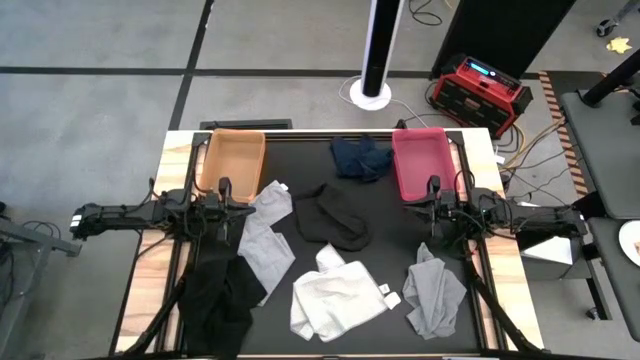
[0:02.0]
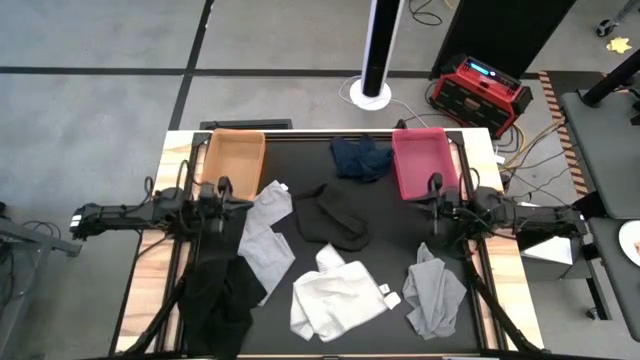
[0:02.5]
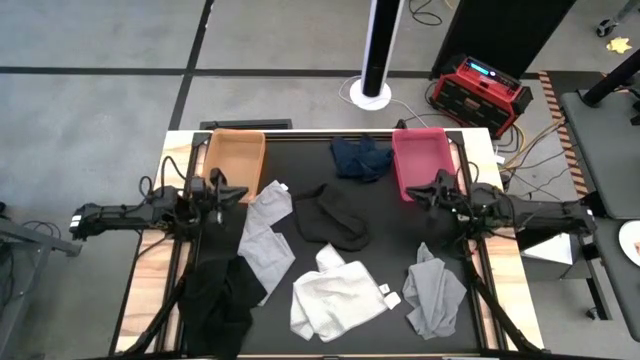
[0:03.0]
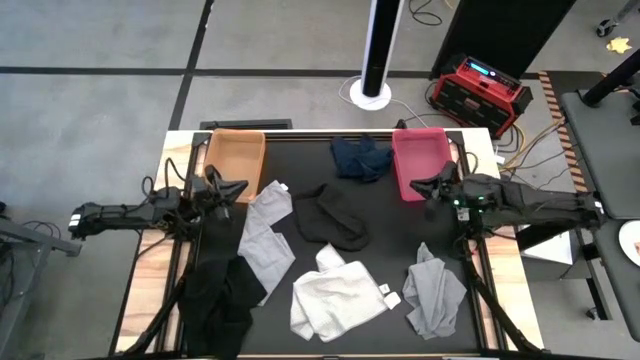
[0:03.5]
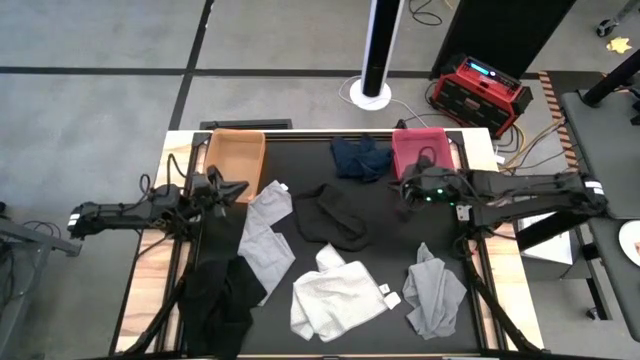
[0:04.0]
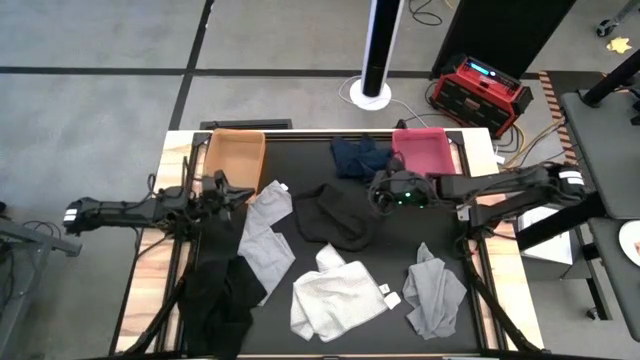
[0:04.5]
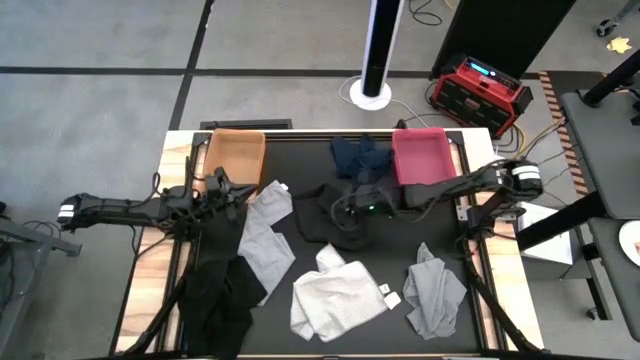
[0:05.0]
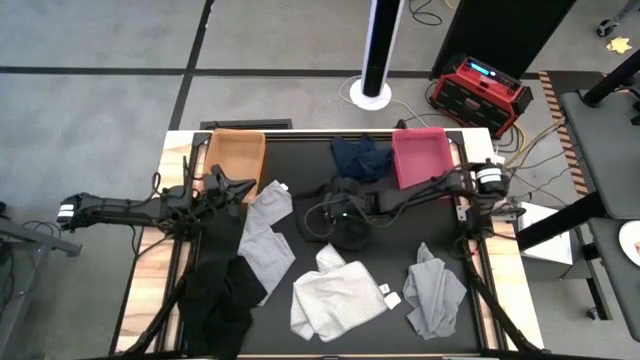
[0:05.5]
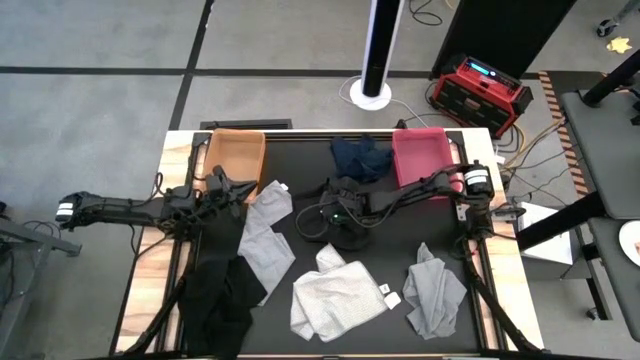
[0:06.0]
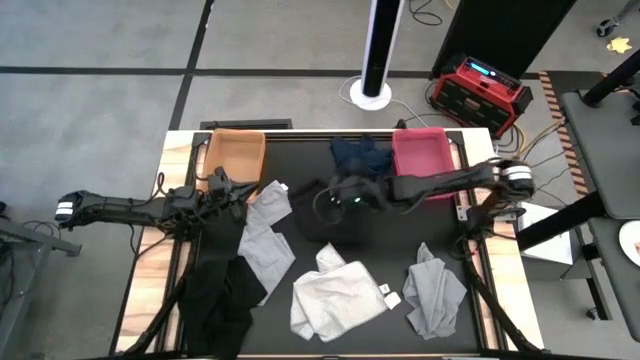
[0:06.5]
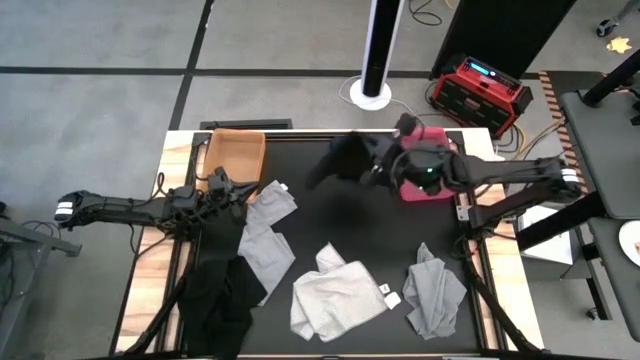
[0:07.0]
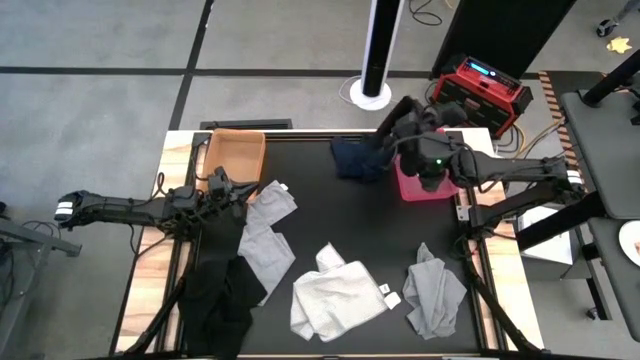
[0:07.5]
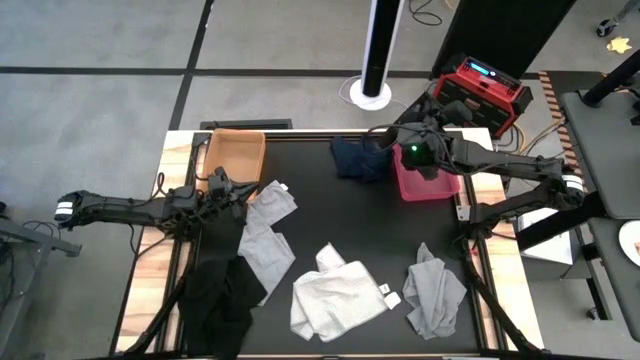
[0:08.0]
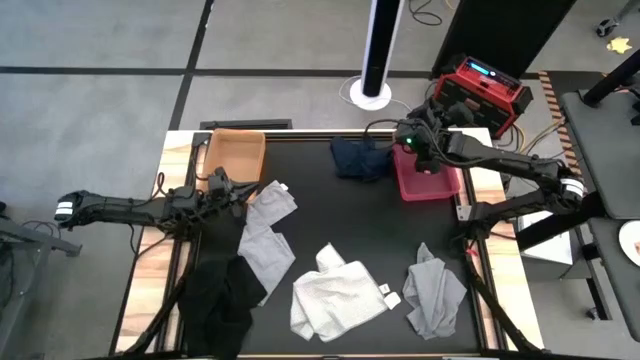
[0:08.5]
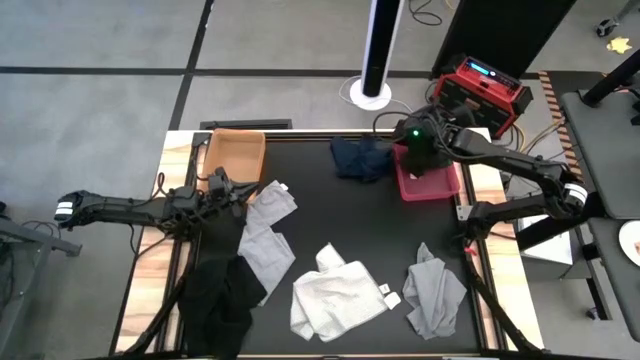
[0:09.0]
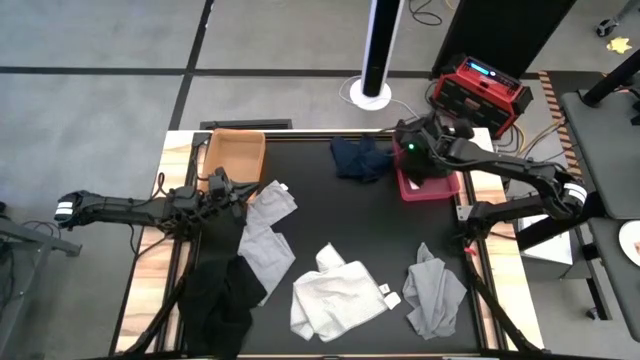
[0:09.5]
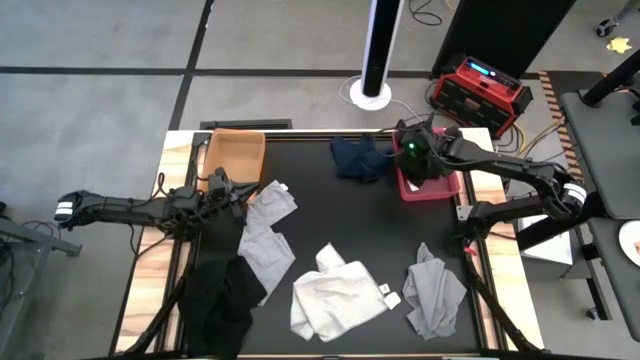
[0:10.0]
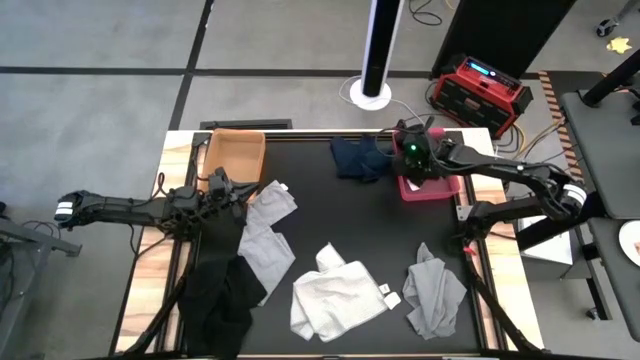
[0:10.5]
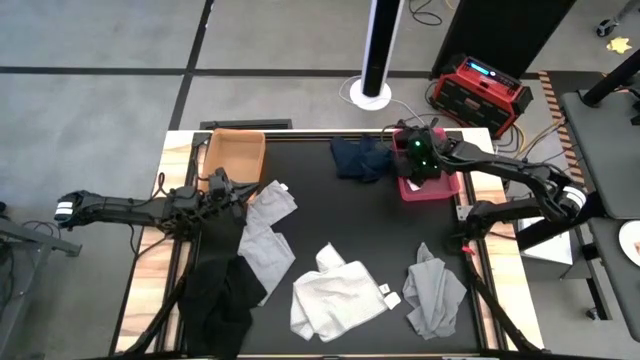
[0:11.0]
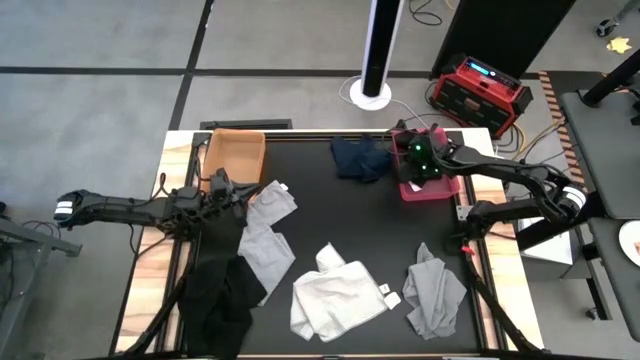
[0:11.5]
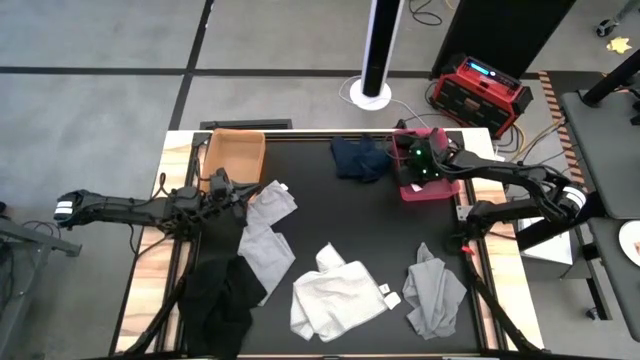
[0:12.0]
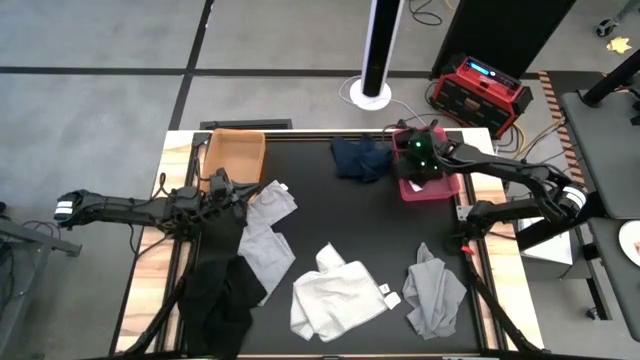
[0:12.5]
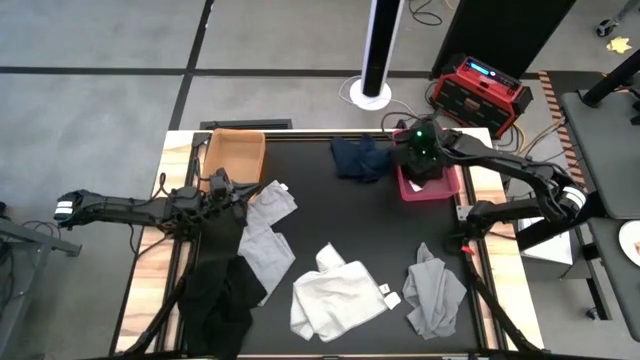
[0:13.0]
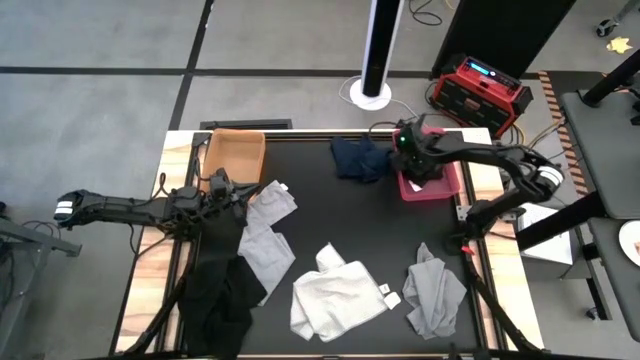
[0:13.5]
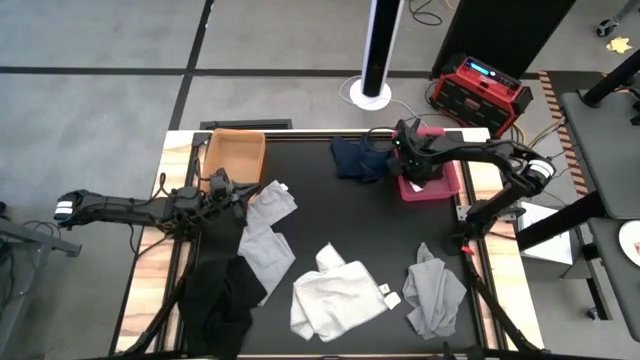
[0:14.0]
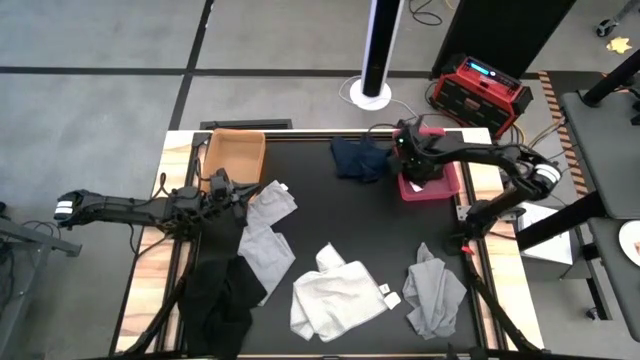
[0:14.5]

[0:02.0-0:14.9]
Task: Sort towels by color in basket
Put the right black towel into the red bin

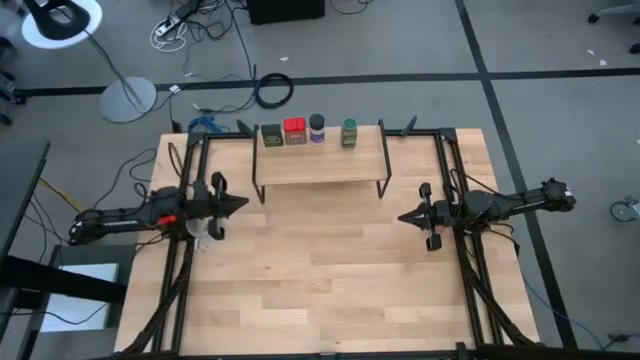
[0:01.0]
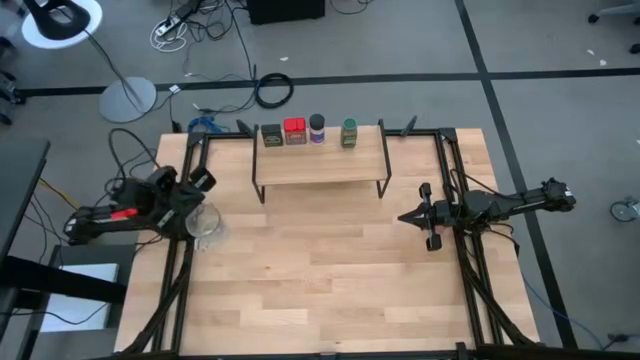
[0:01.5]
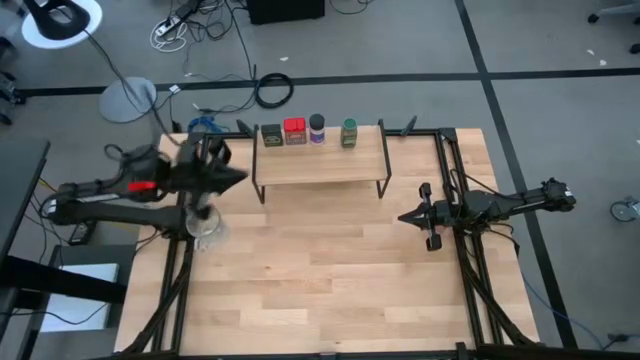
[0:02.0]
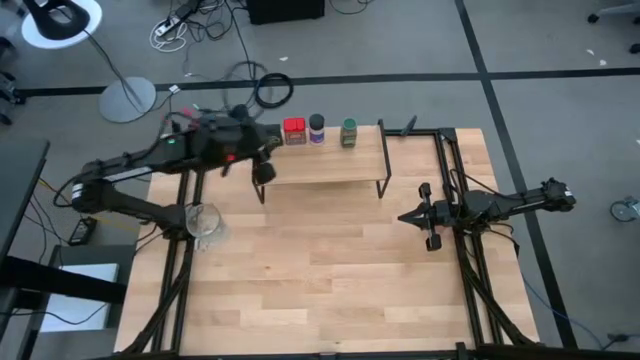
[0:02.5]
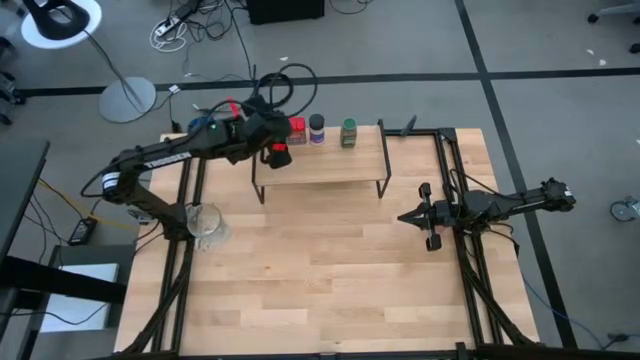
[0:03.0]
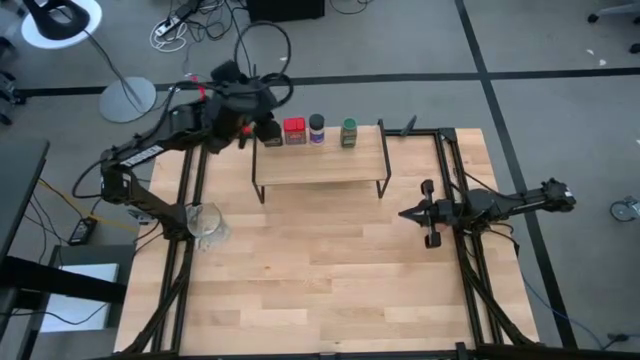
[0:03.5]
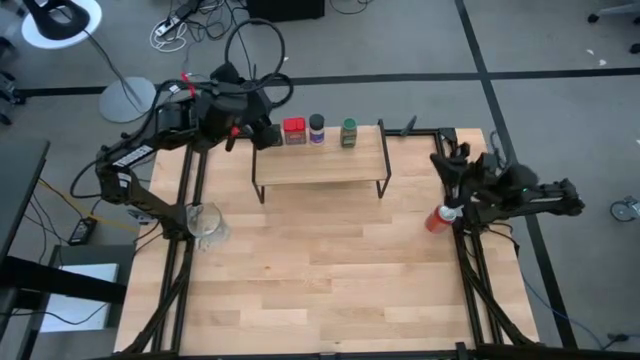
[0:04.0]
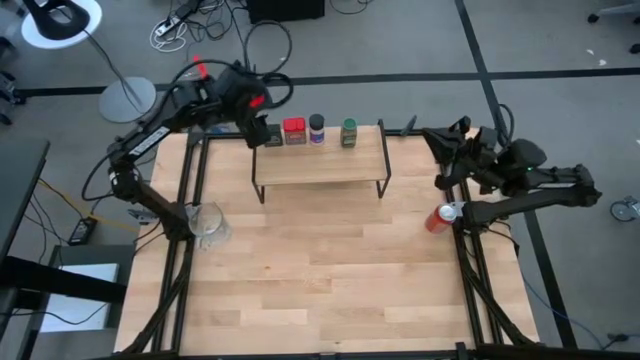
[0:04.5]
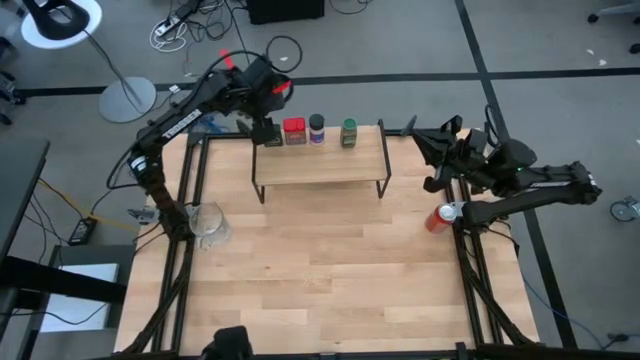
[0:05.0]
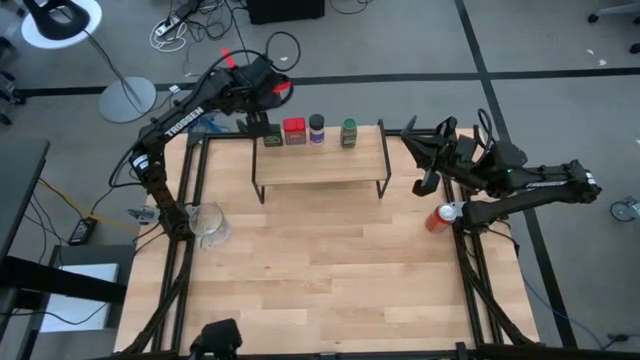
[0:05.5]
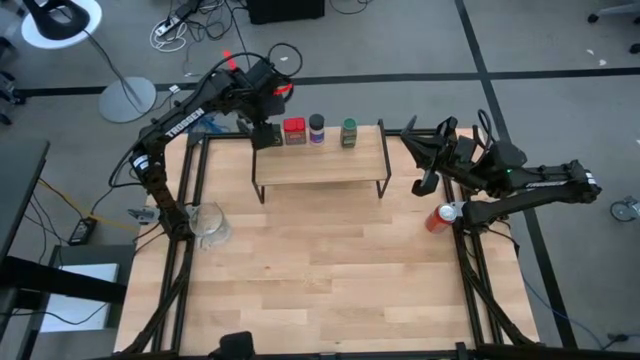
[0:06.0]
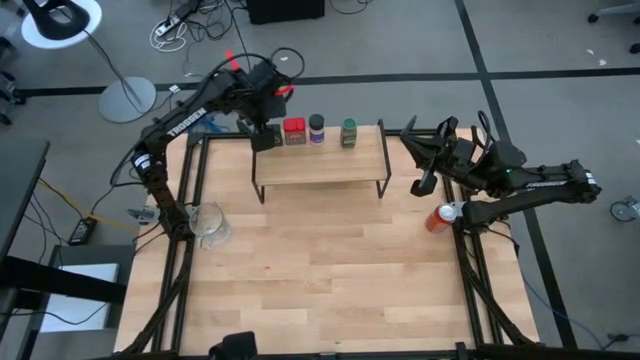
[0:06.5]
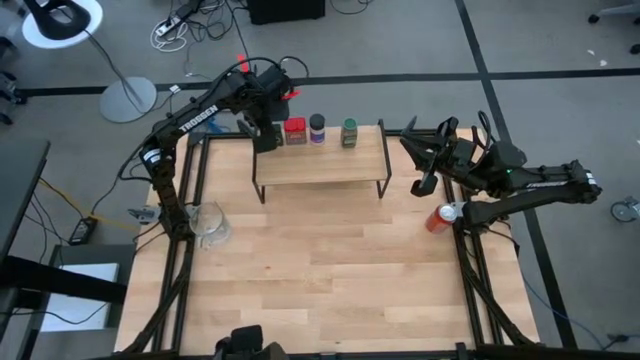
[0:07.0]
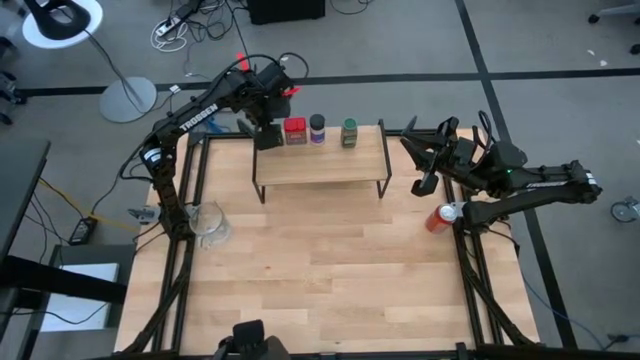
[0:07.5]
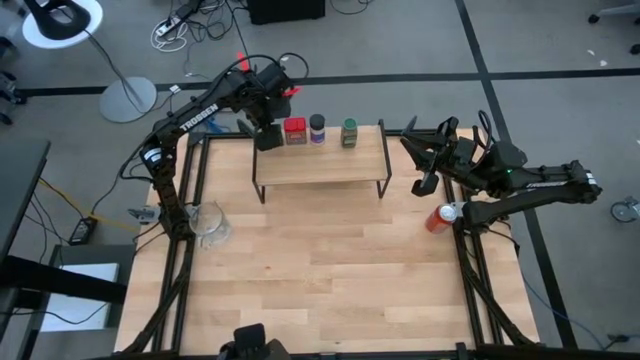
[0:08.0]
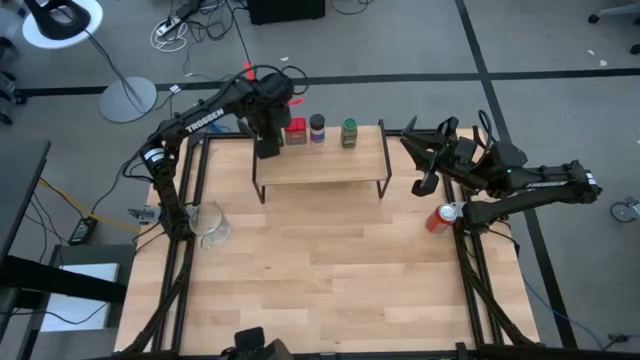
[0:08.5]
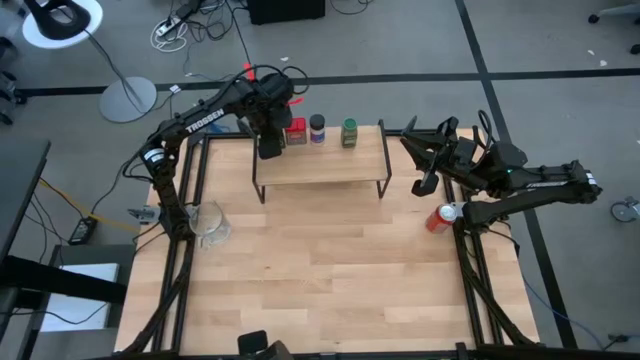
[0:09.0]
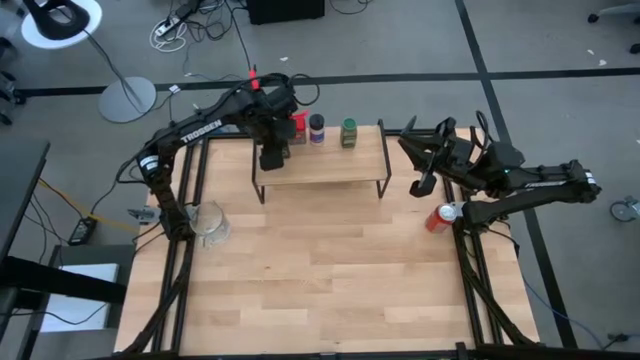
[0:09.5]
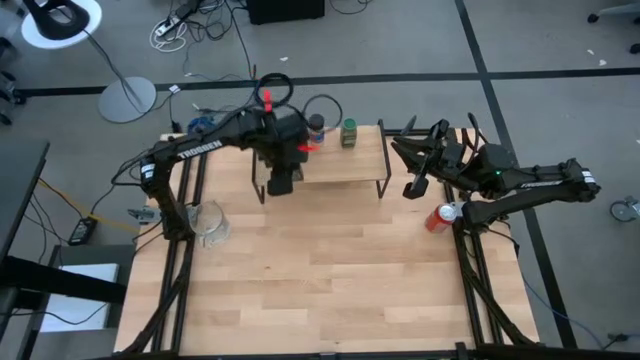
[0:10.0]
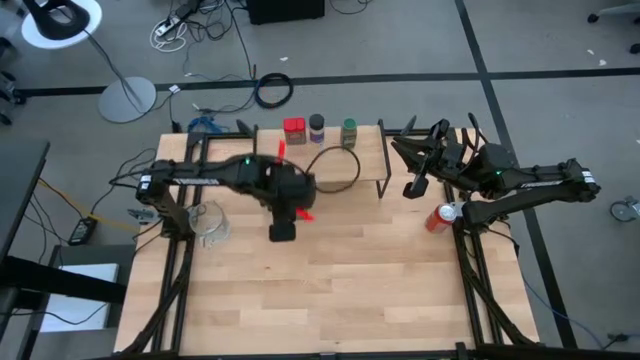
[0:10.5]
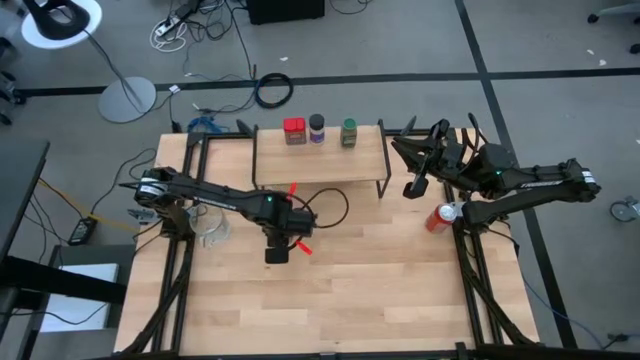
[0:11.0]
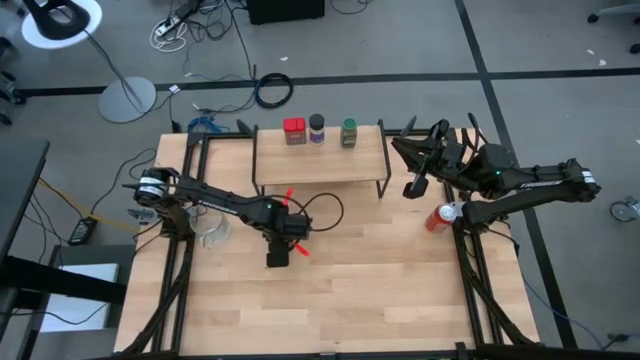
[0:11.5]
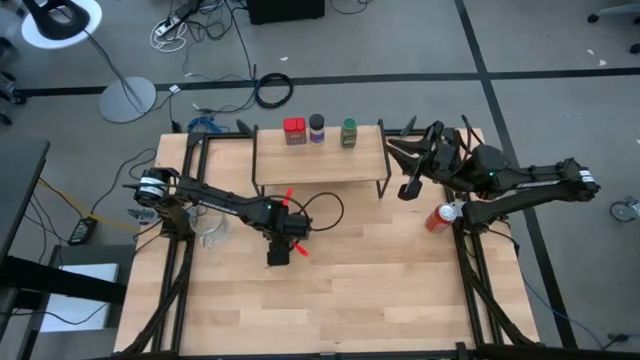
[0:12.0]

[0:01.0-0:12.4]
Task: Shelf spices
Remove the black seasoning can from the shelf
